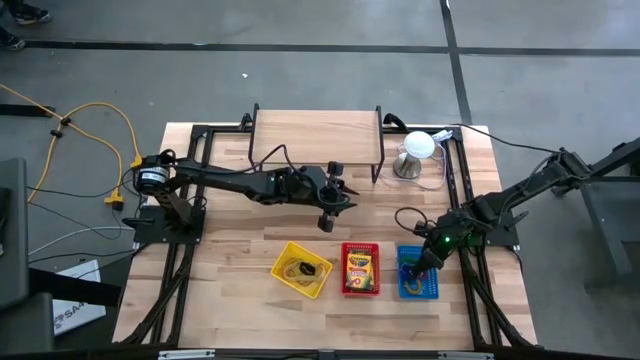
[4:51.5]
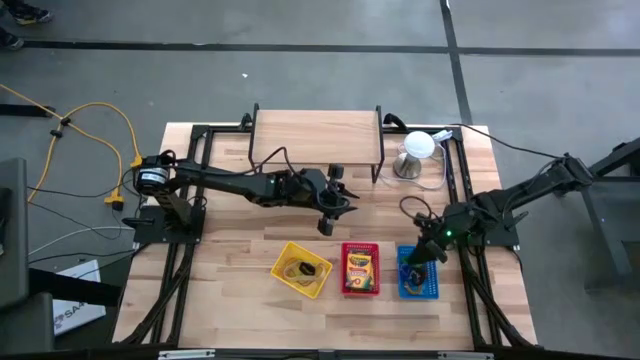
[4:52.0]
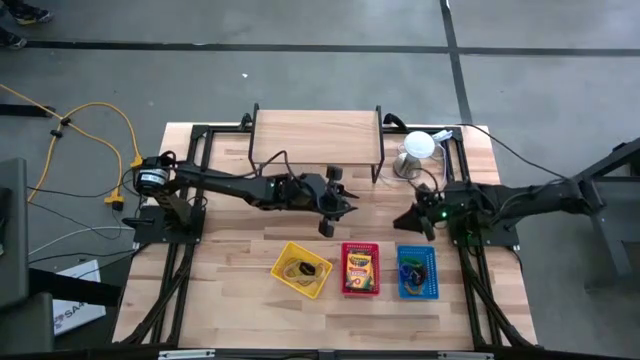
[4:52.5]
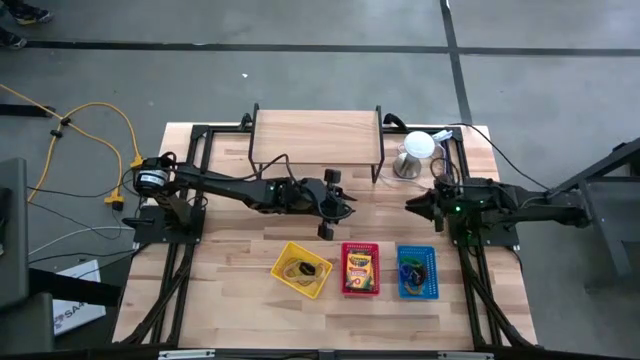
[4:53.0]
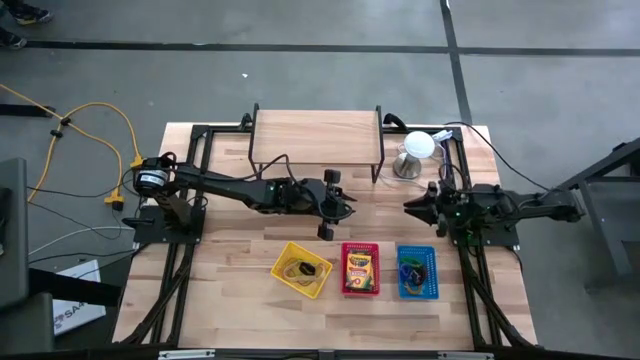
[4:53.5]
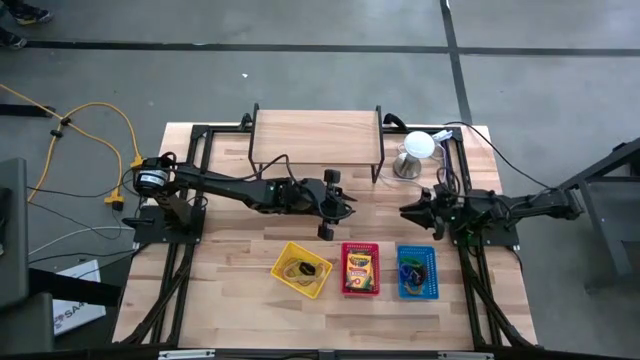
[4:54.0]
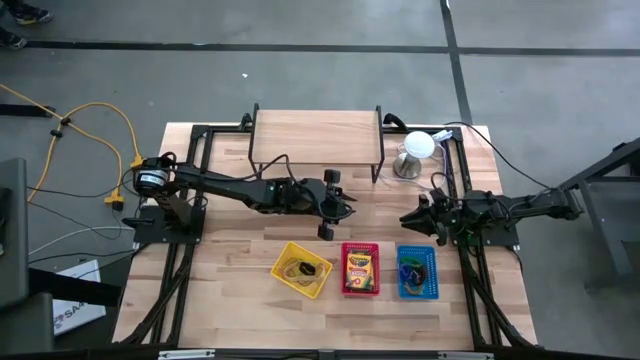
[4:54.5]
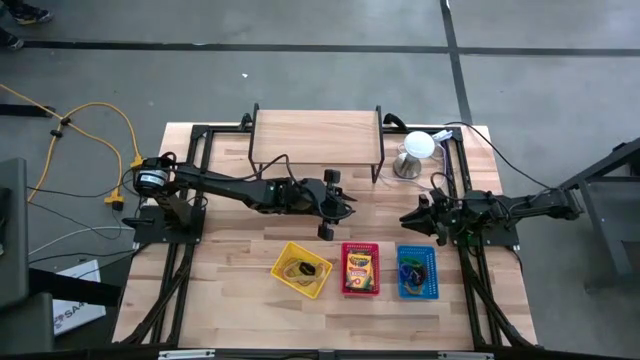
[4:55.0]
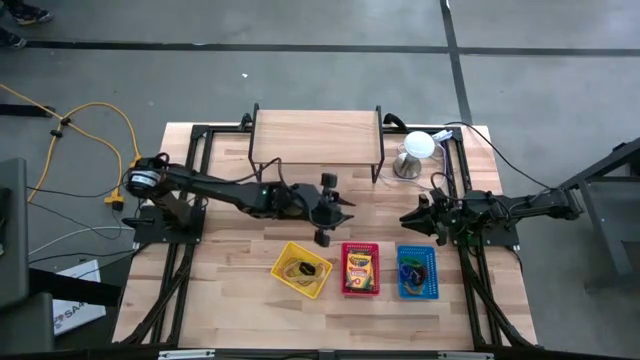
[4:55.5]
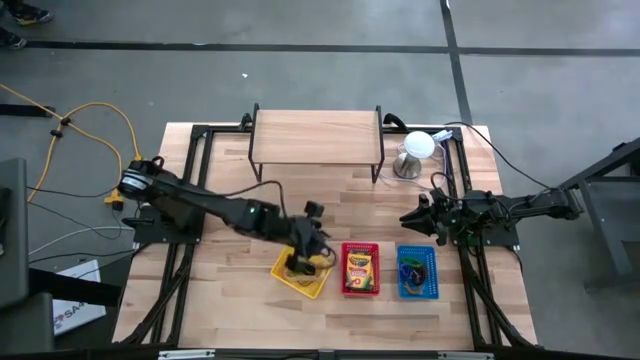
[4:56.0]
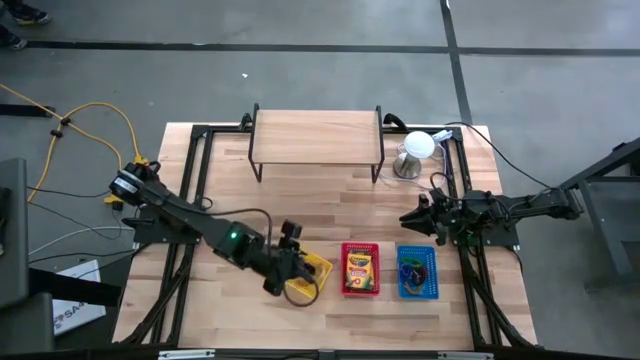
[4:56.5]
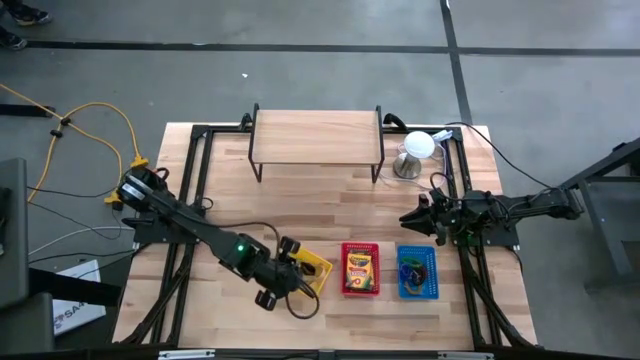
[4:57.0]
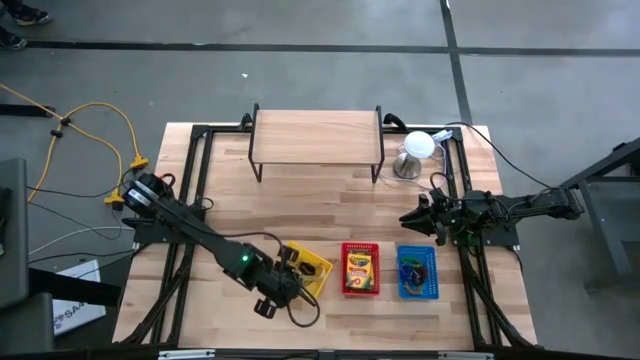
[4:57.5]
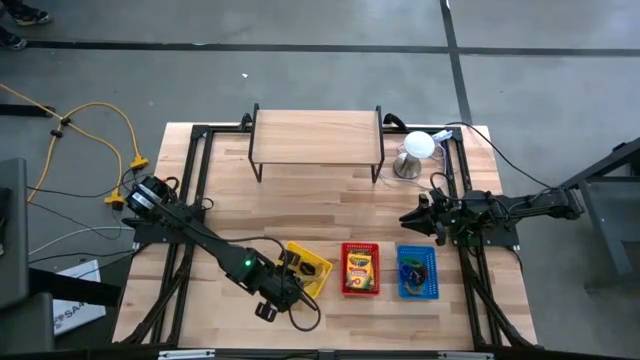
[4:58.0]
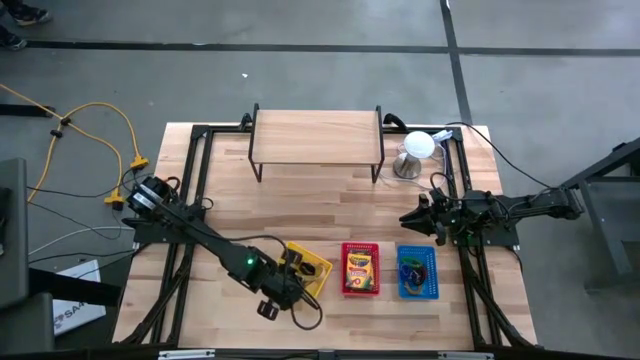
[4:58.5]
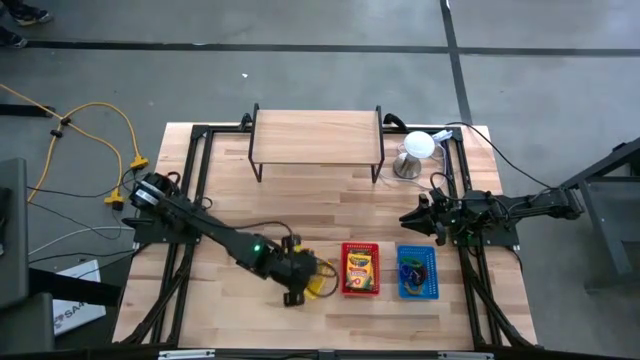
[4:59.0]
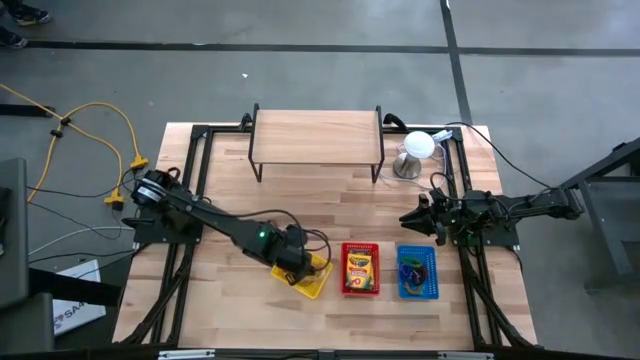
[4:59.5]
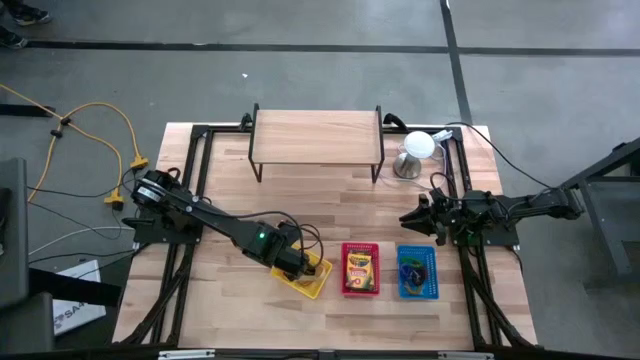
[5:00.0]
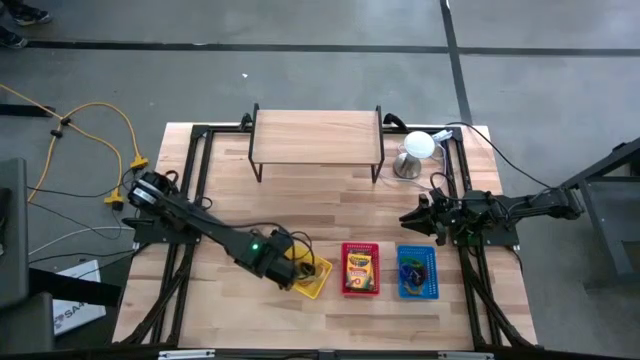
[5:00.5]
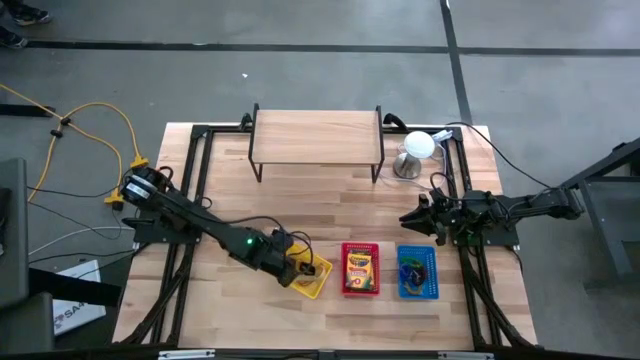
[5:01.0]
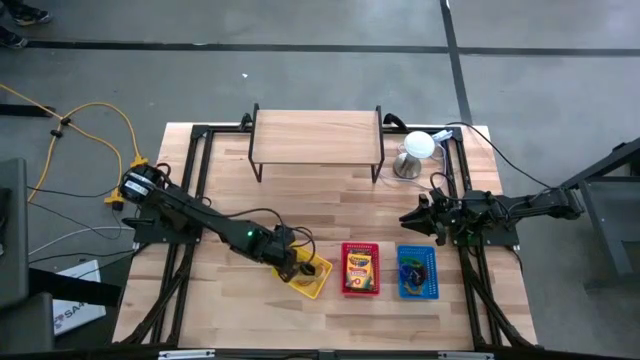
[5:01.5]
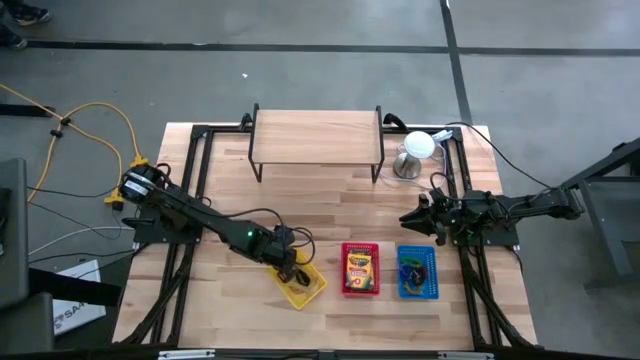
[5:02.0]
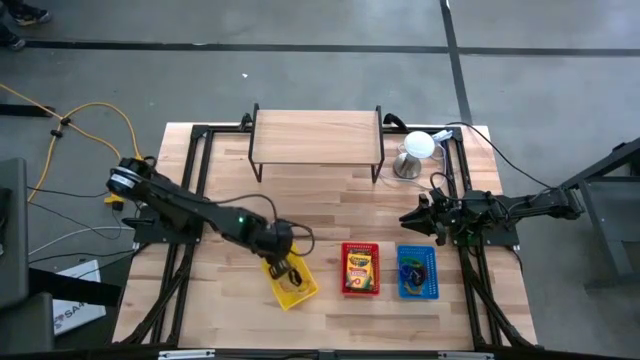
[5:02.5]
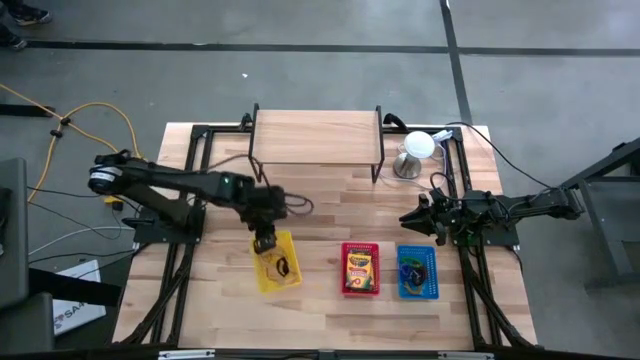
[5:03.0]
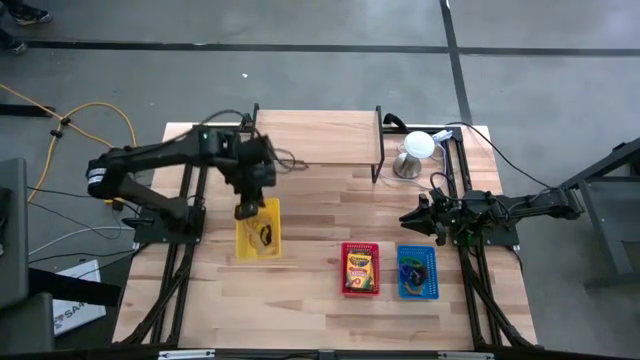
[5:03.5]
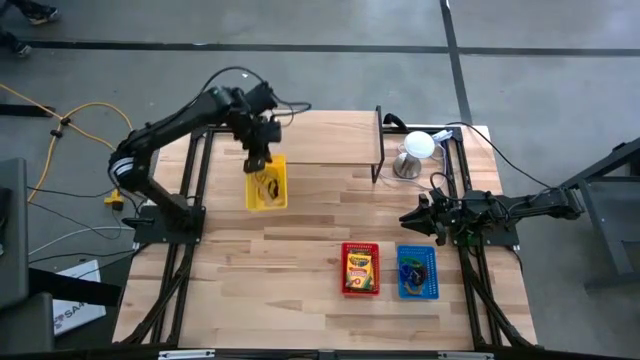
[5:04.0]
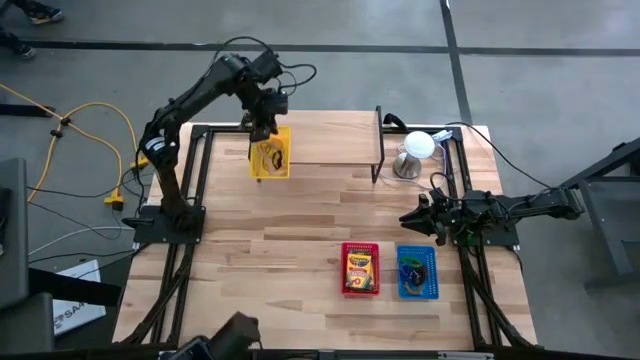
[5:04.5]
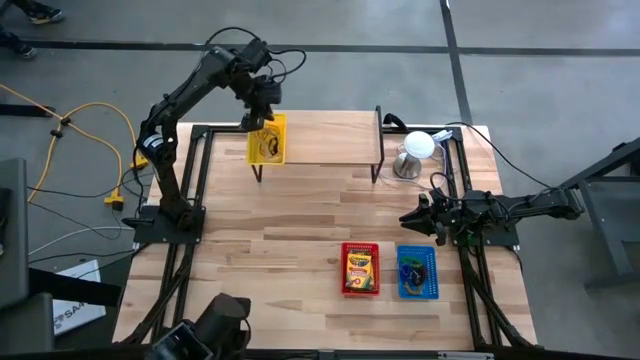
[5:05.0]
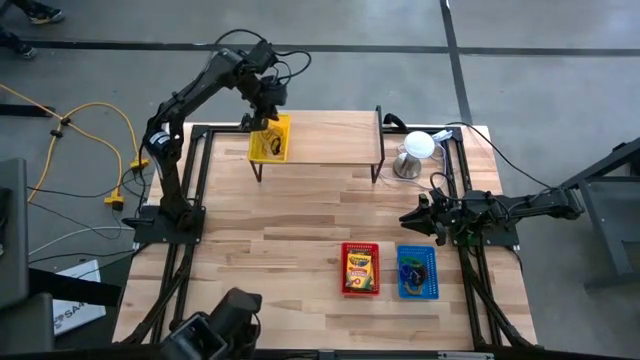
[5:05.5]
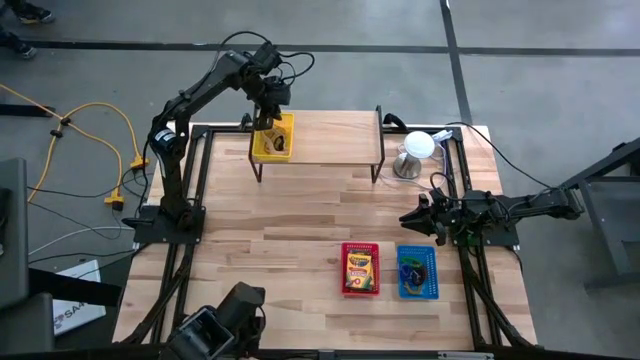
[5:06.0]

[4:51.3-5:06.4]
Task: Pick & Place Office Desk Supplies
Put the yellow bin with the rubber bands on the shelf

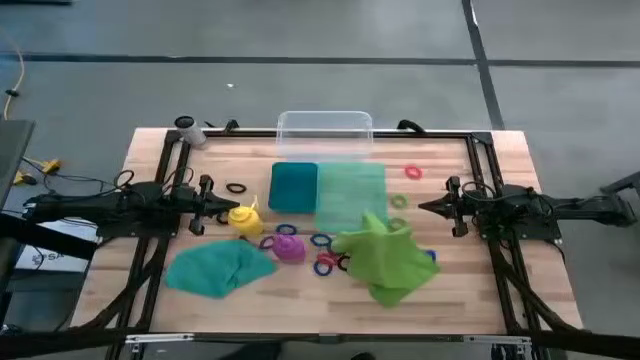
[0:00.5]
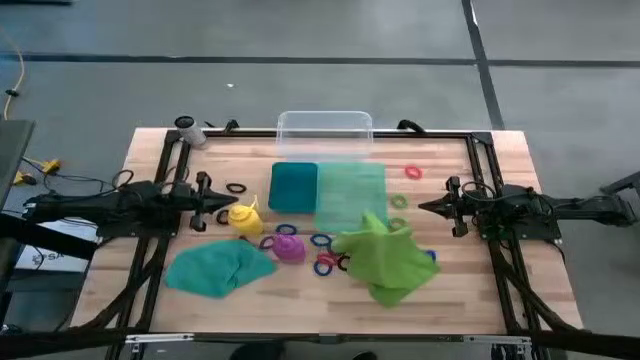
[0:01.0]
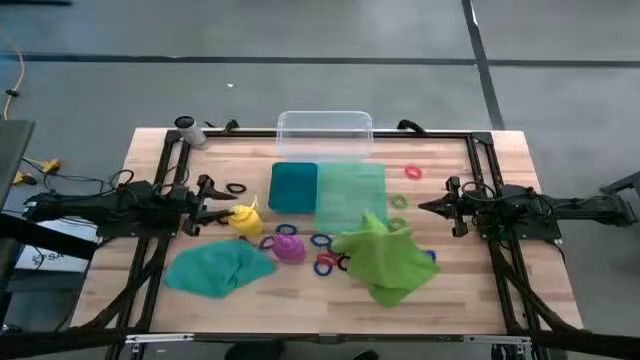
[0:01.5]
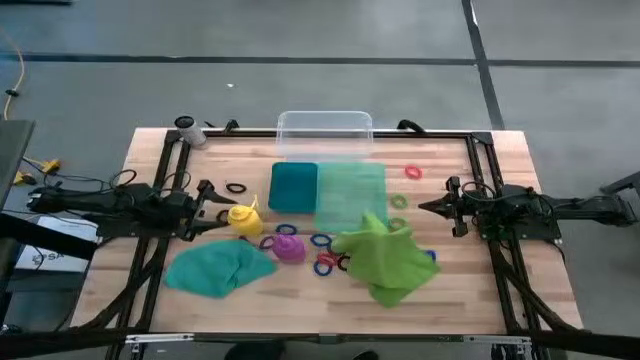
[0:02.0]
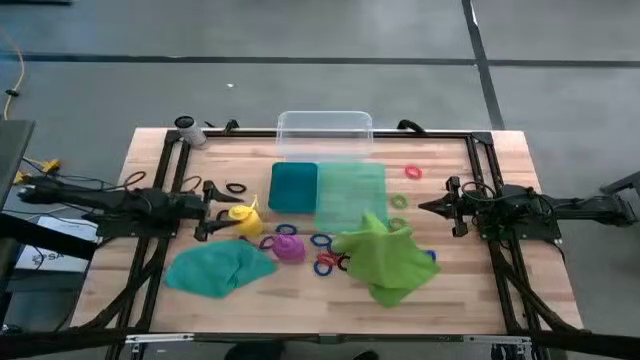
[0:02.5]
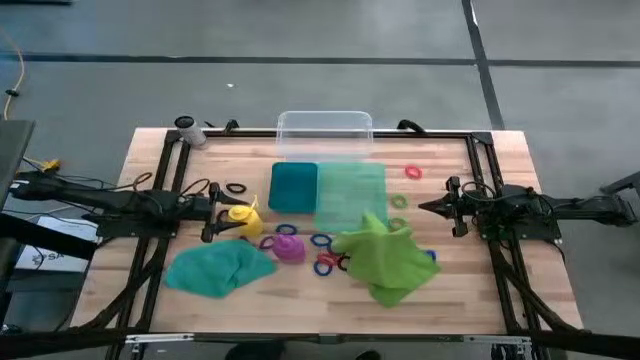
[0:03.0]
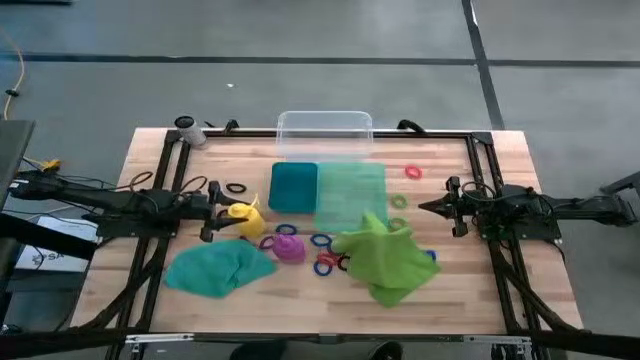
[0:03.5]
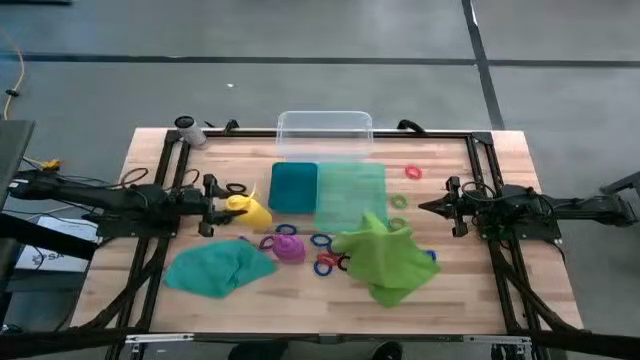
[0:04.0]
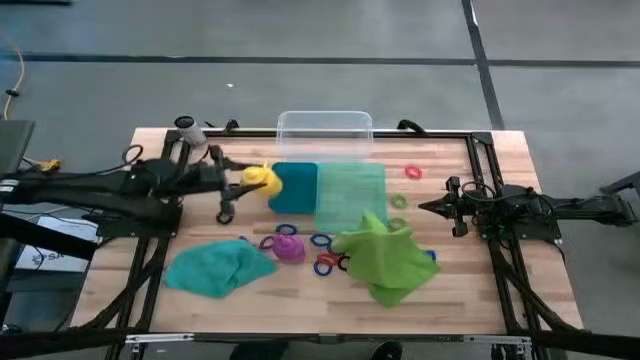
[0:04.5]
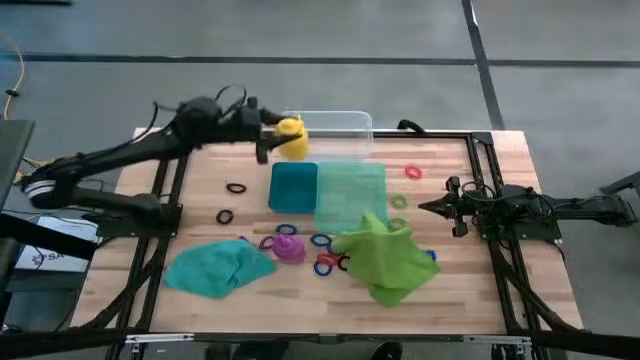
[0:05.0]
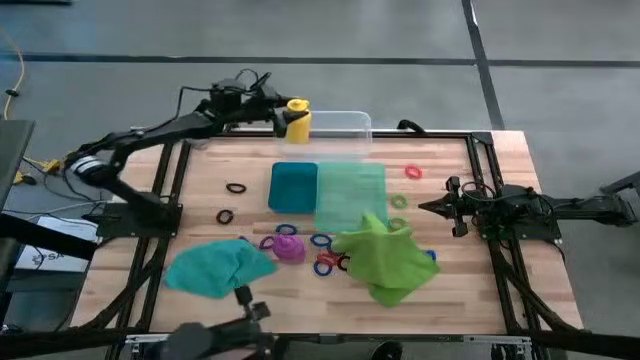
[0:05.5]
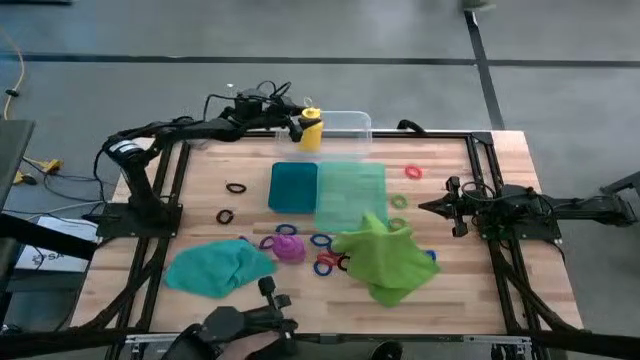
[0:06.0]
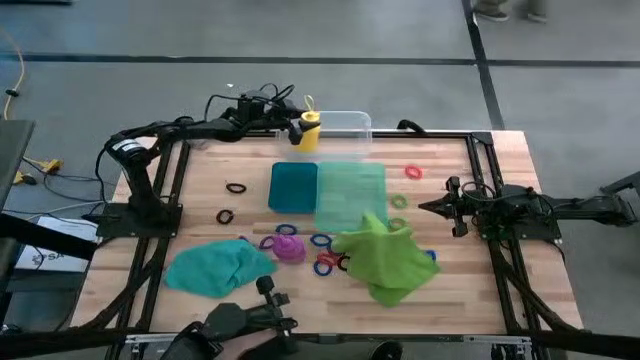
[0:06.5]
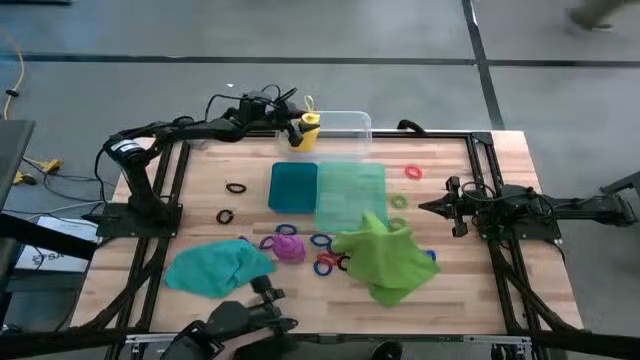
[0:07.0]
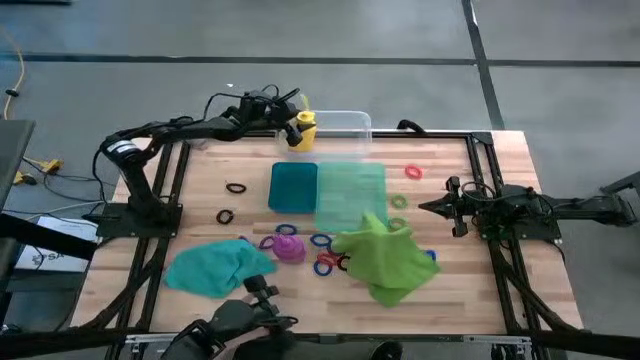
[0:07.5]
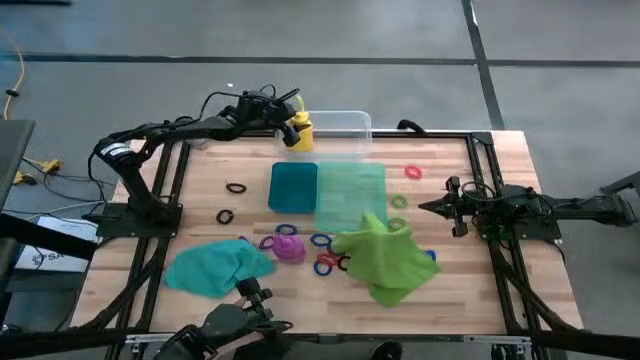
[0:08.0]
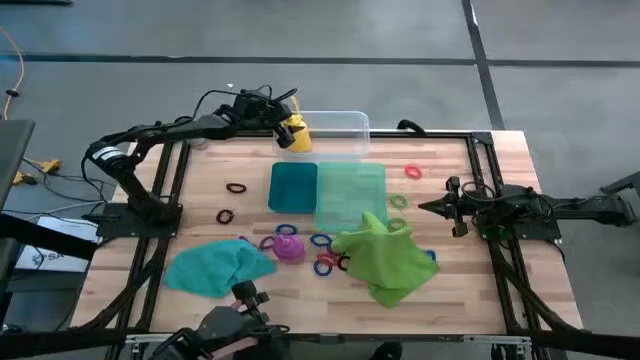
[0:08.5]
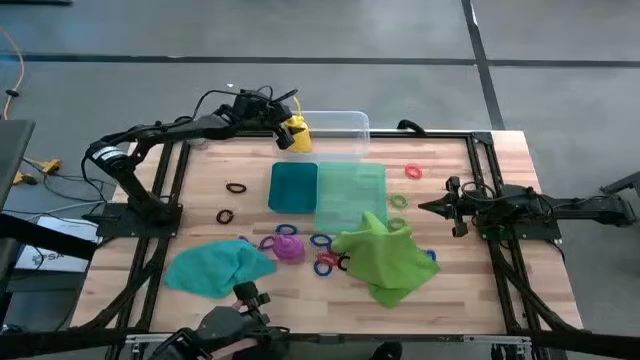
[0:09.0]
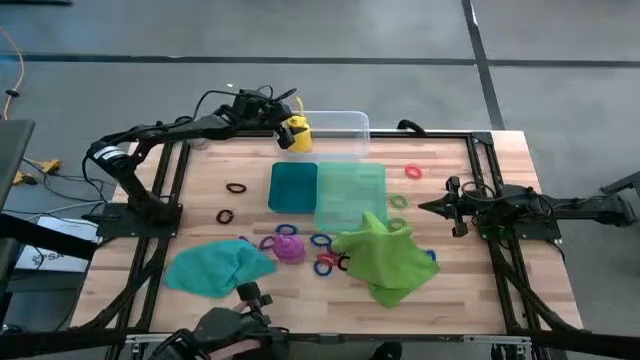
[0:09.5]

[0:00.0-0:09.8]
Task: Pick & Place Sports Items
Put the yellow tumbler into the transparent bin
